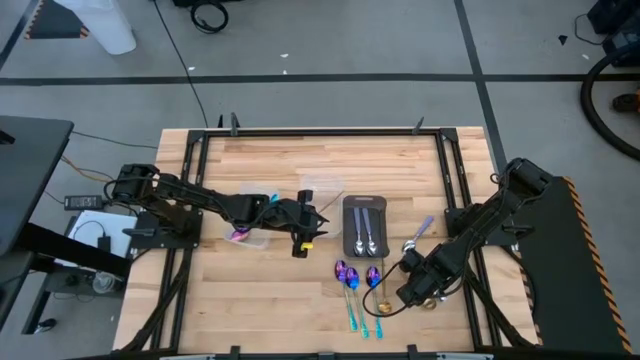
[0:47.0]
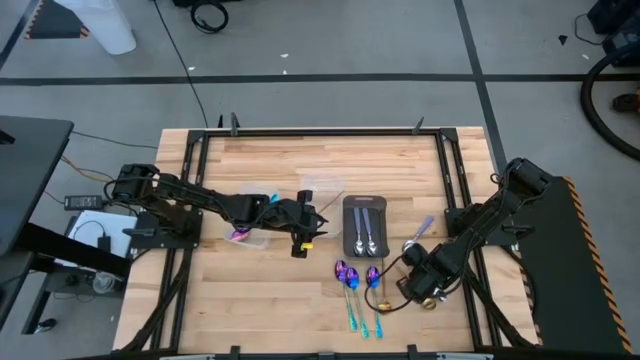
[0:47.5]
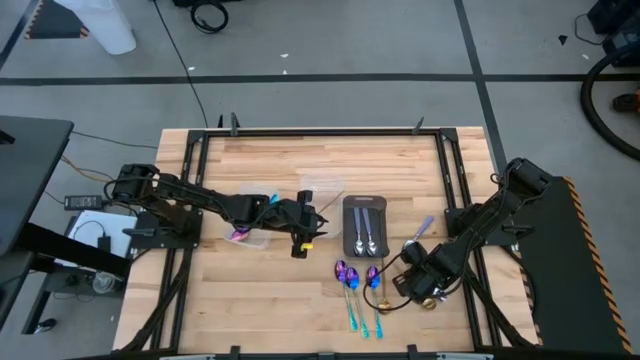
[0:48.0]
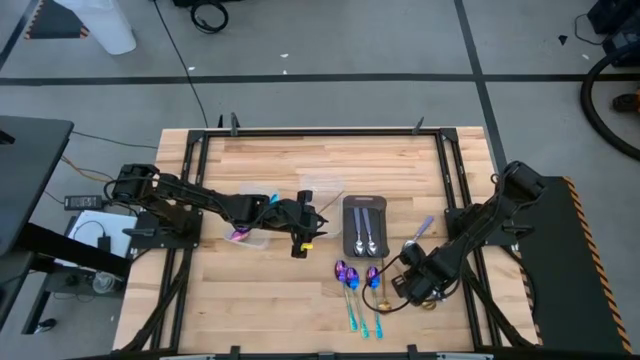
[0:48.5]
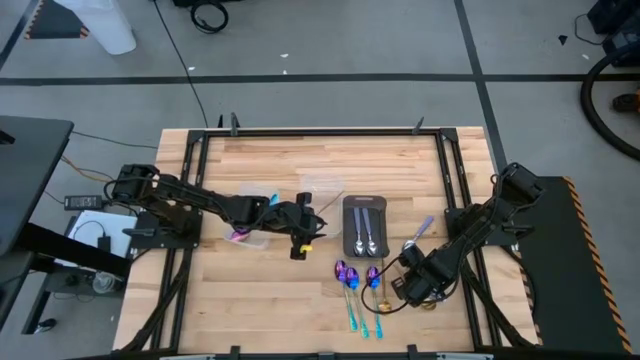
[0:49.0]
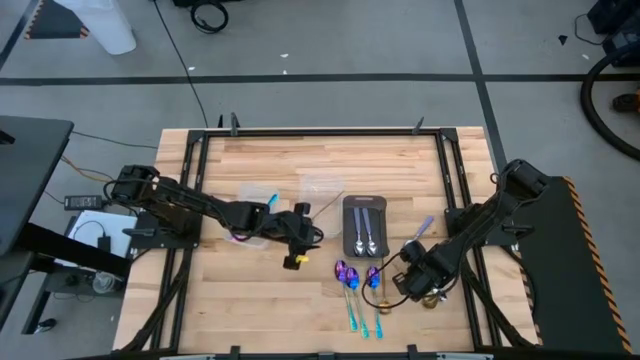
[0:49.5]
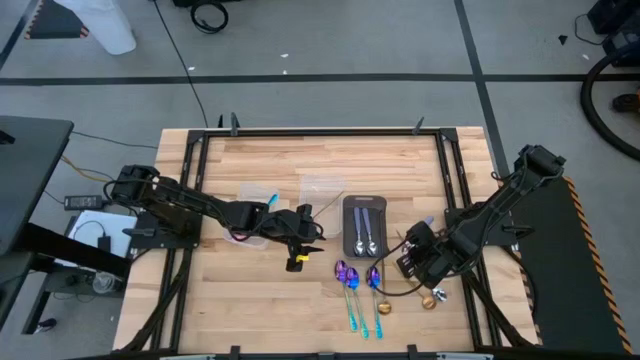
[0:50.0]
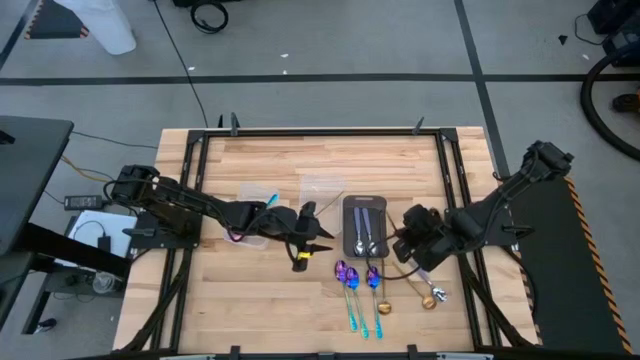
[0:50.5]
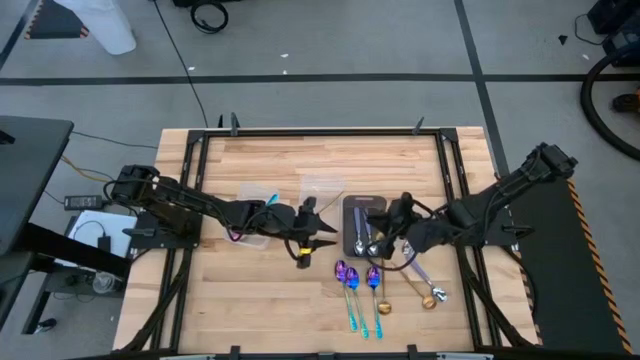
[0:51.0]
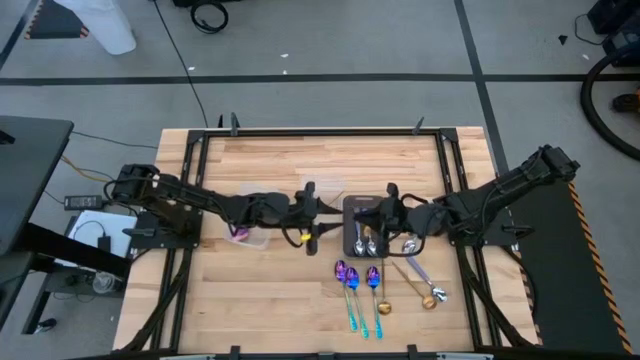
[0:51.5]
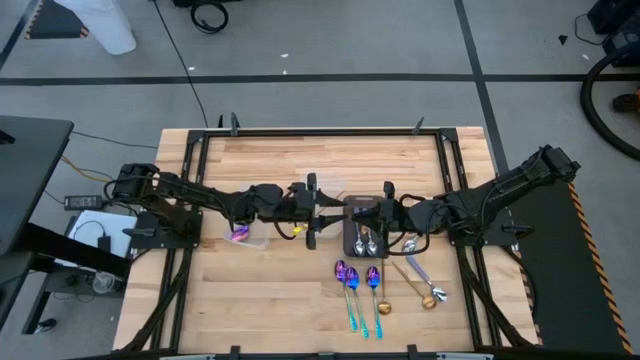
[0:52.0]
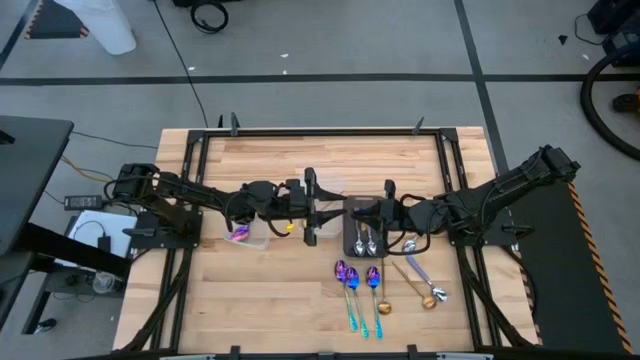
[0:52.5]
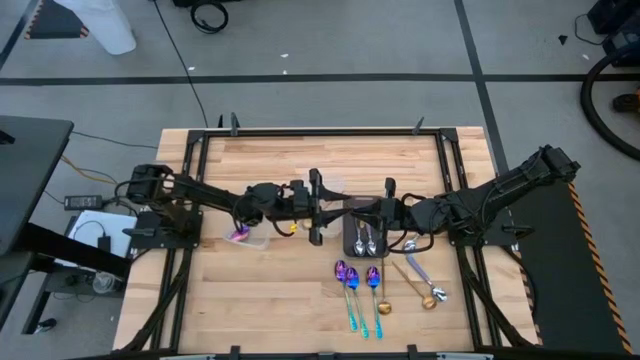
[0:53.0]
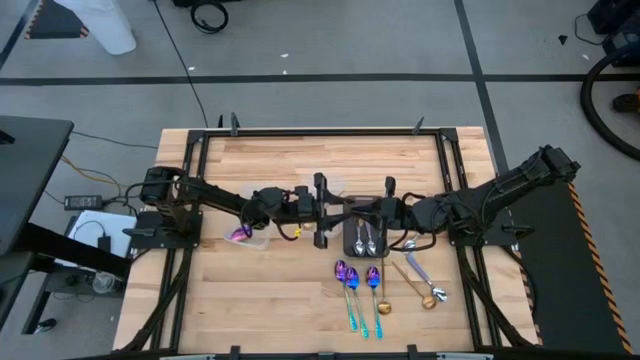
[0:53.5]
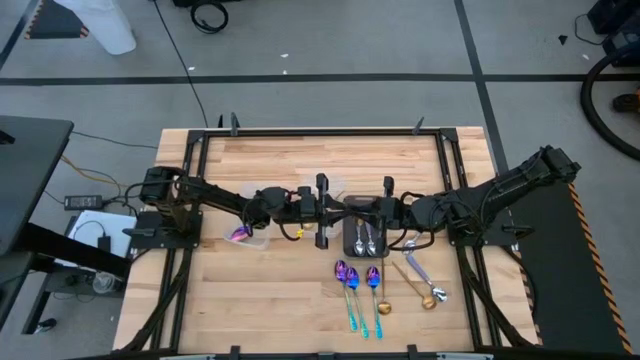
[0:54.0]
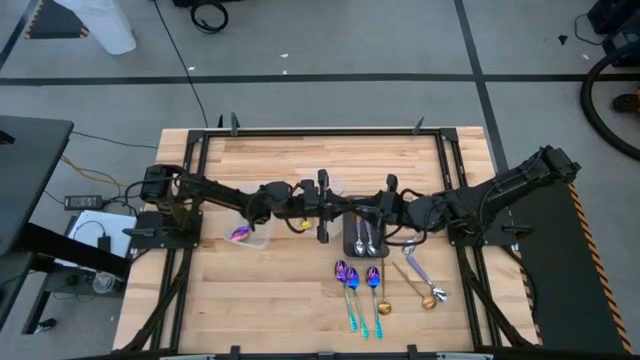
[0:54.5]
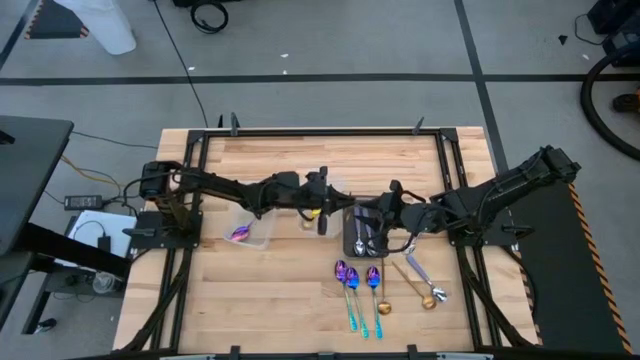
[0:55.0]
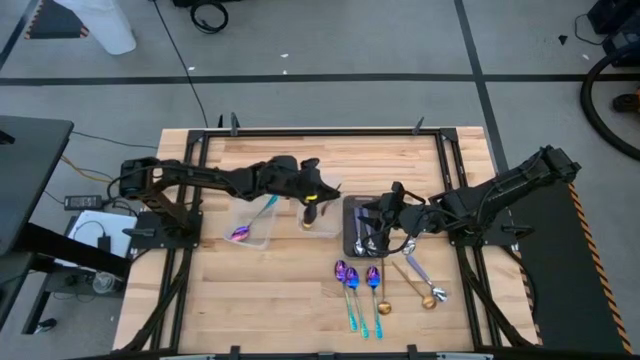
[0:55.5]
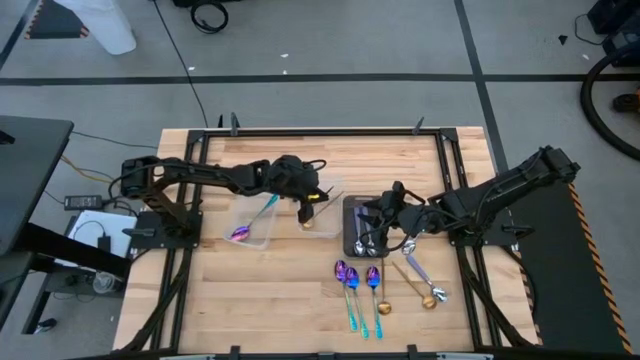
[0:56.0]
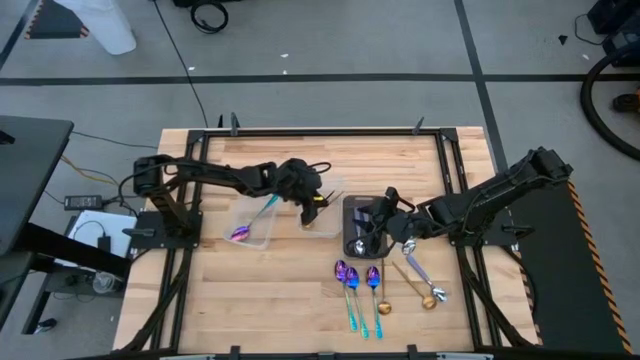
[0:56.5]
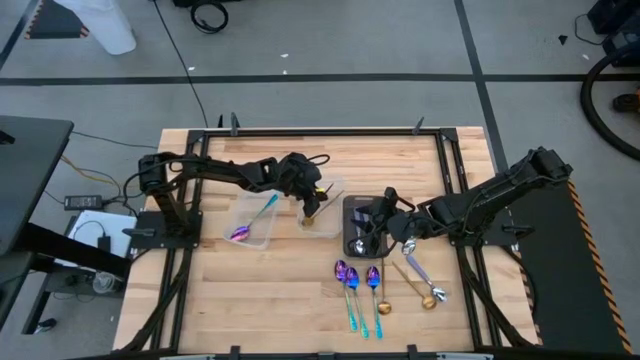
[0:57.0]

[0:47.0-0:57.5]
Task: Sort silverware by color (type)
Put the gold spoon into the right transparent bin

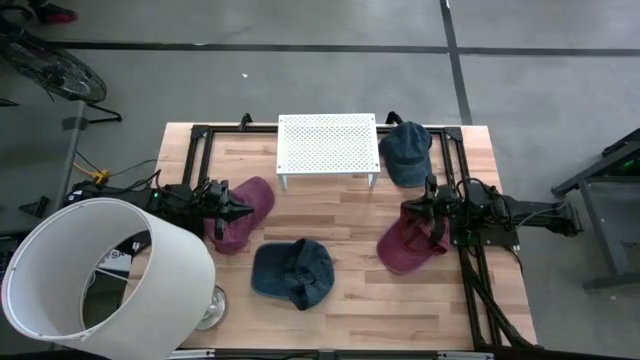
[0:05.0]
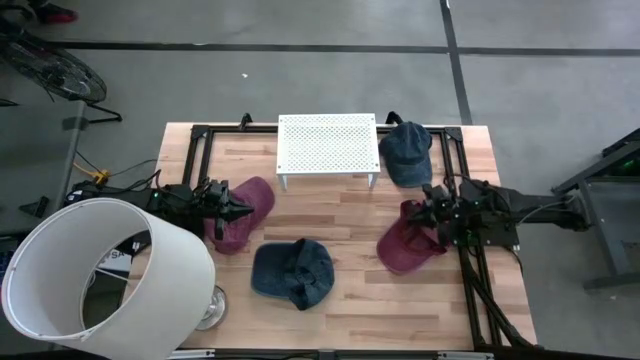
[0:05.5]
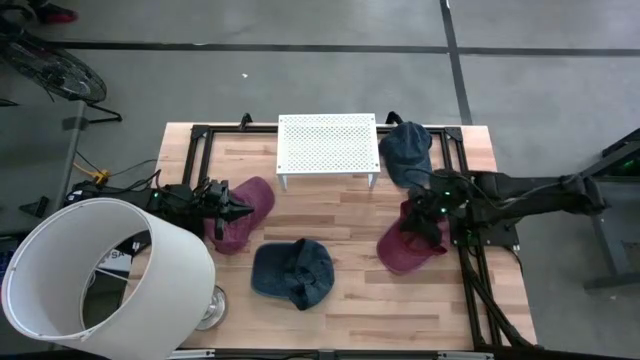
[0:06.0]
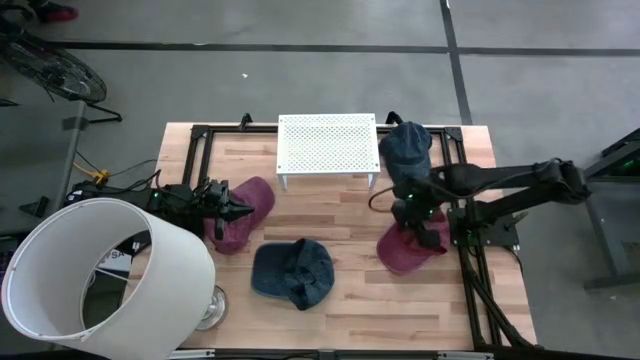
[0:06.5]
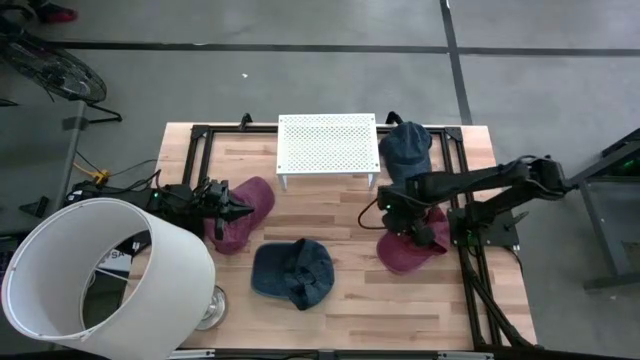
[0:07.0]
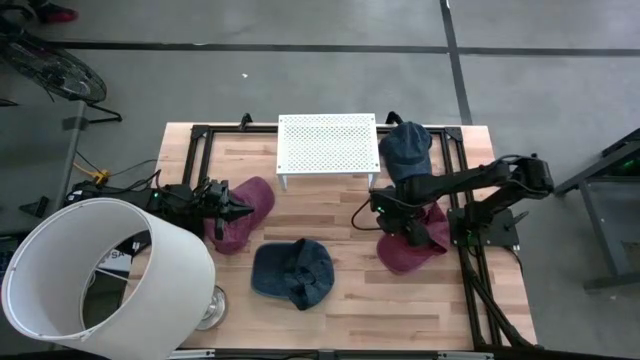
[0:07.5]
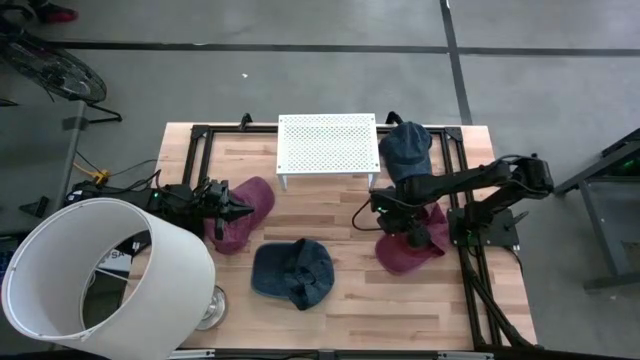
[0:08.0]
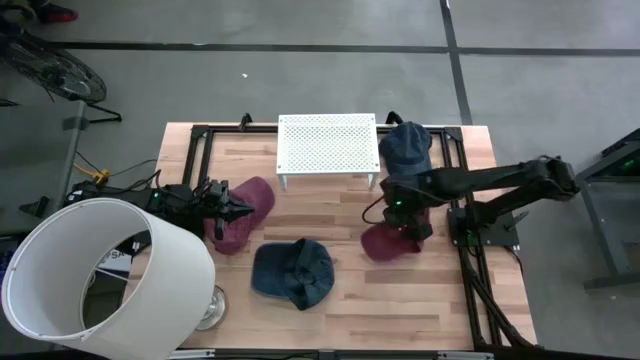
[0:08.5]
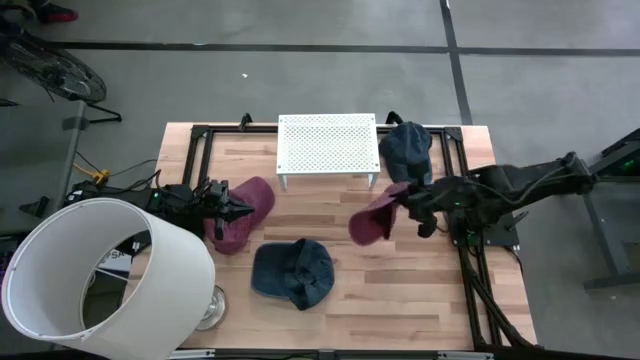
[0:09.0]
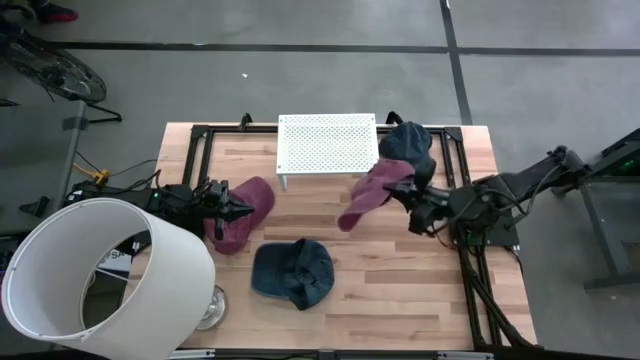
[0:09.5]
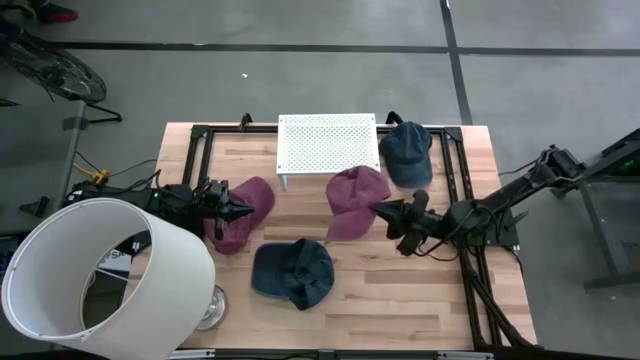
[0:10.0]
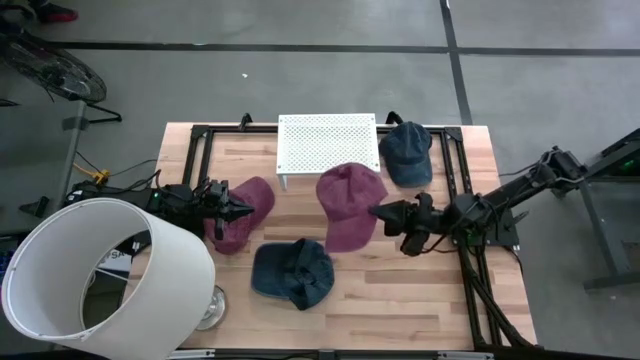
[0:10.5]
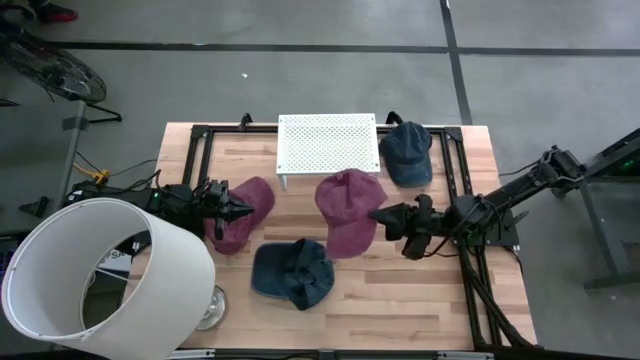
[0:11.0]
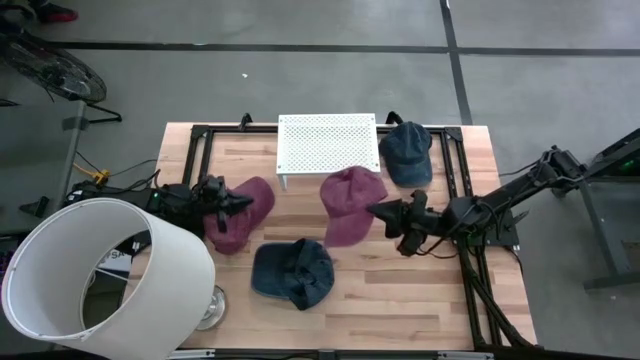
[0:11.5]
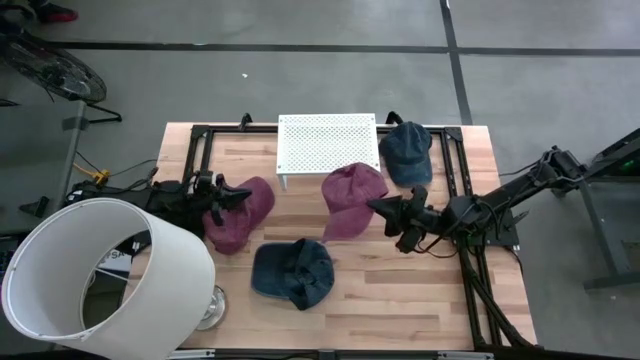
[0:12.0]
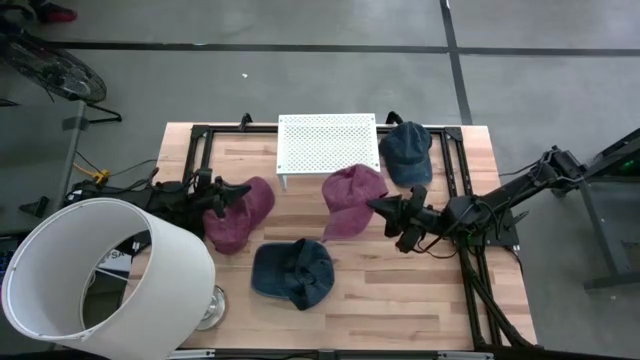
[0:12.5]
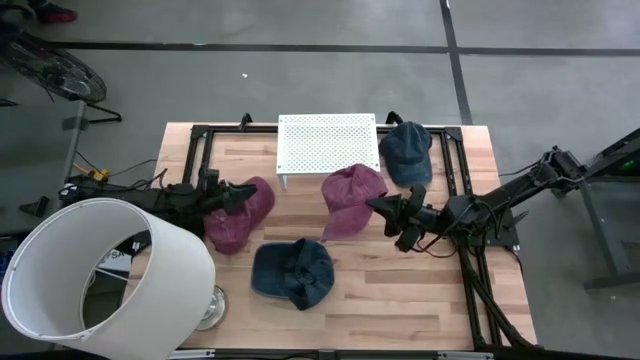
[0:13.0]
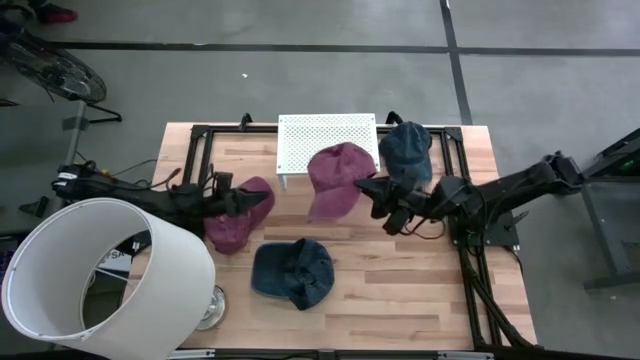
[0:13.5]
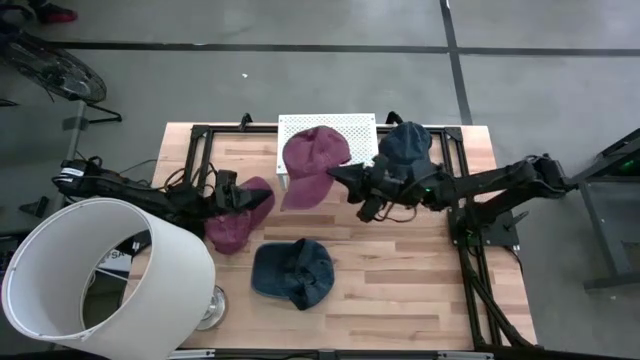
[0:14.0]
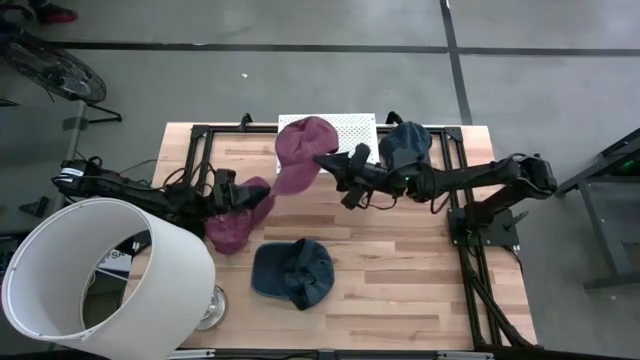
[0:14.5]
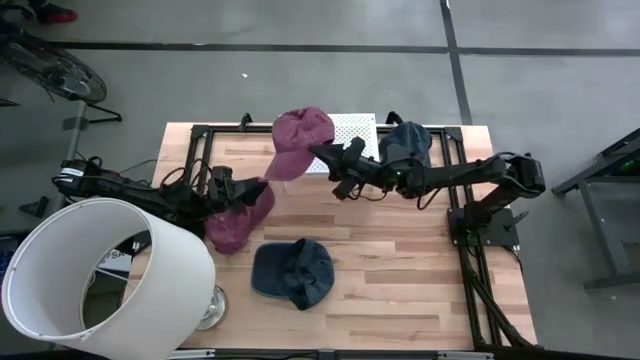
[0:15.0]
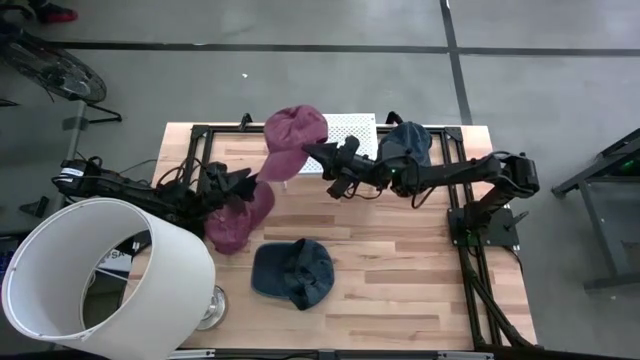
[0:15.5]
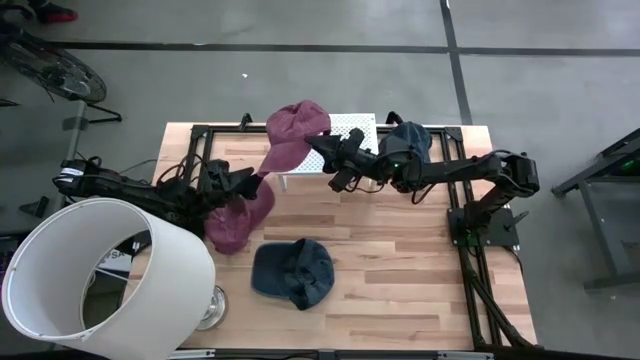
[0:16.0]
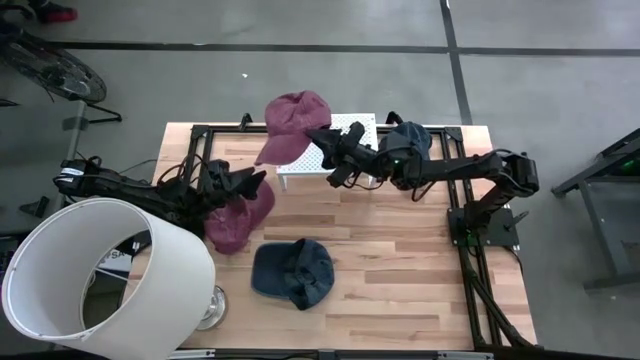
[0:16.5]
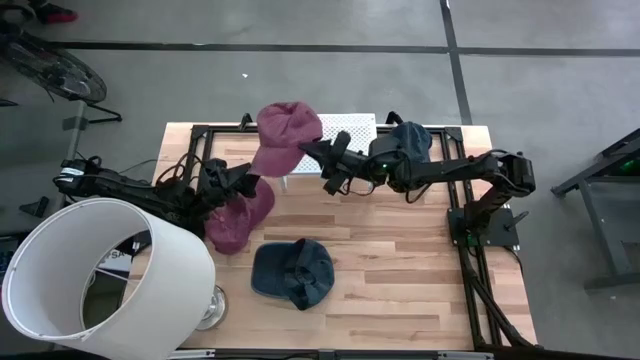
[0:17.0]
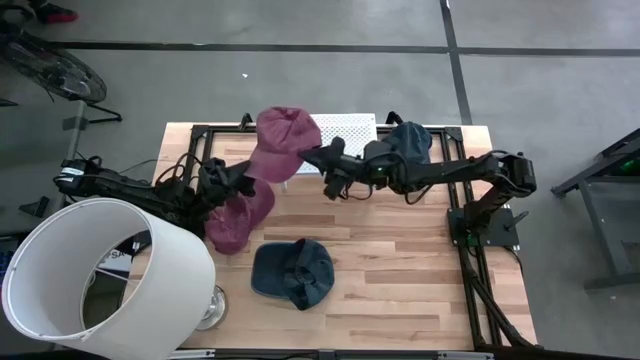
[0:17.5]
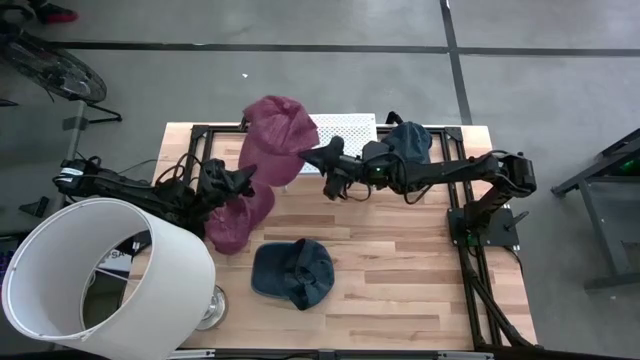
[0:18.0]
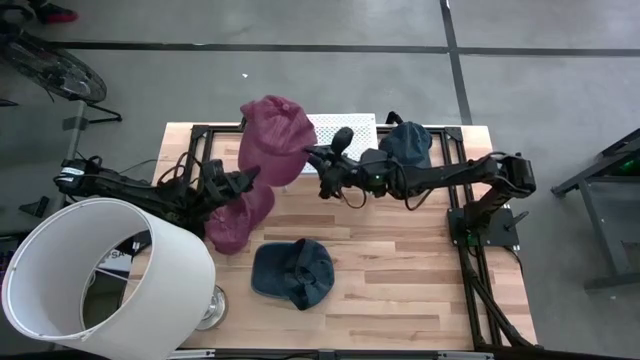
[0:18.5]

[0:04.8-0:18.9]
Task: Pick & Place hat
Put the right dark red cap on the shelf
